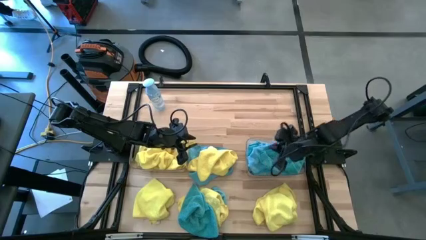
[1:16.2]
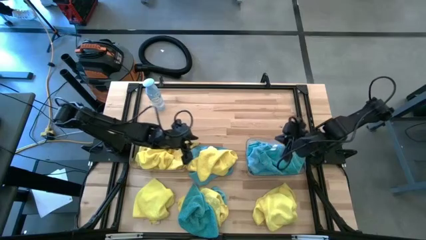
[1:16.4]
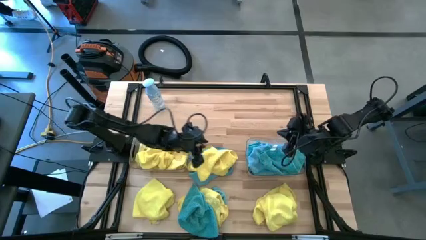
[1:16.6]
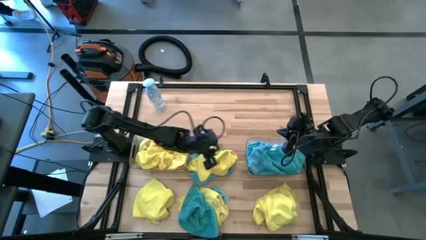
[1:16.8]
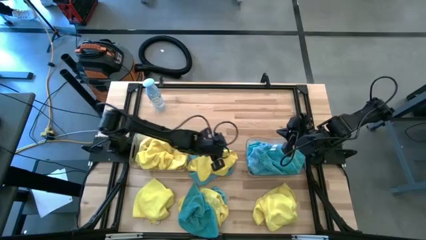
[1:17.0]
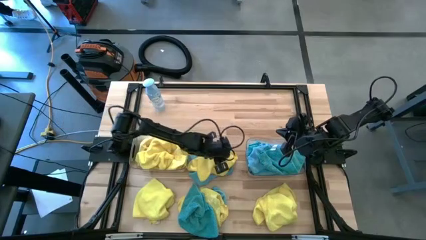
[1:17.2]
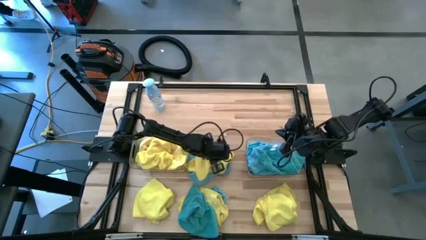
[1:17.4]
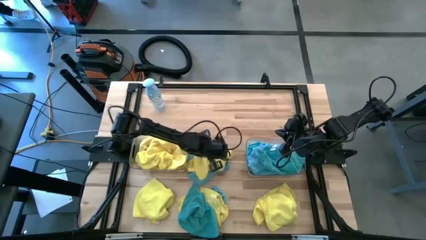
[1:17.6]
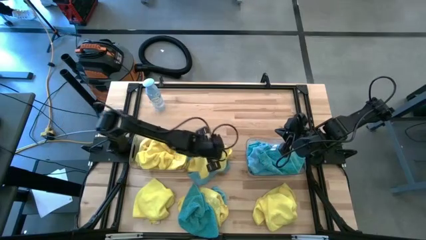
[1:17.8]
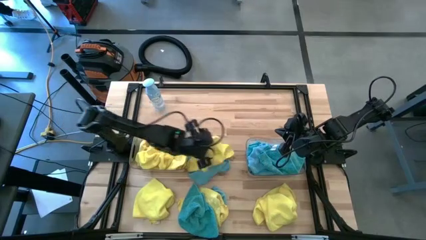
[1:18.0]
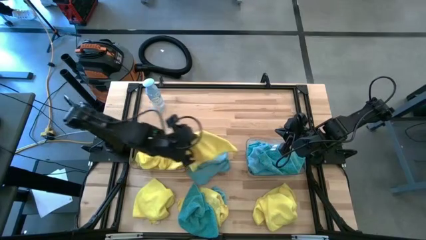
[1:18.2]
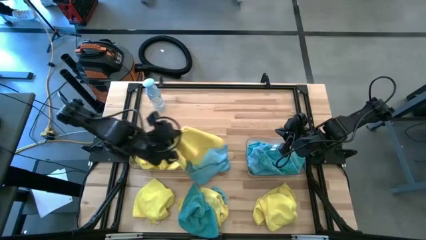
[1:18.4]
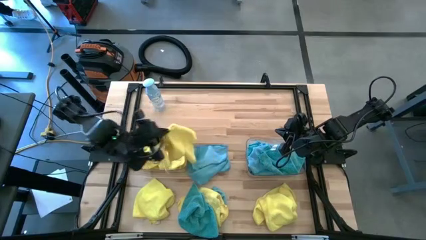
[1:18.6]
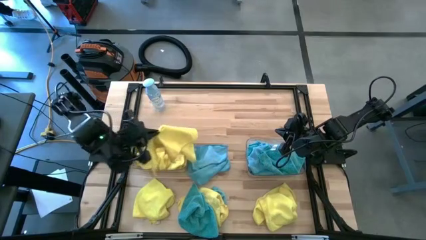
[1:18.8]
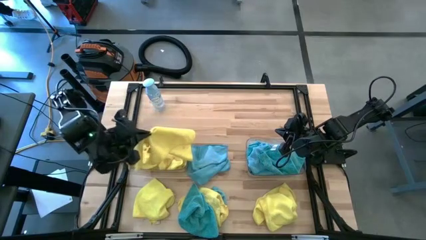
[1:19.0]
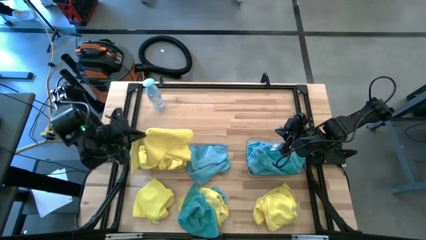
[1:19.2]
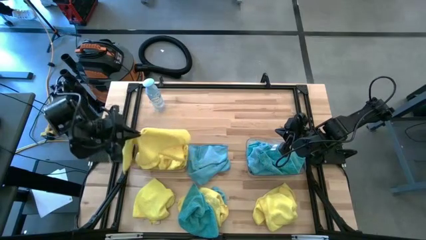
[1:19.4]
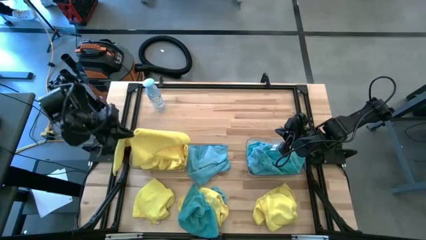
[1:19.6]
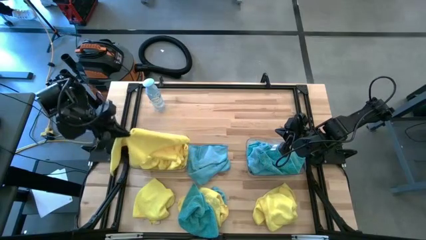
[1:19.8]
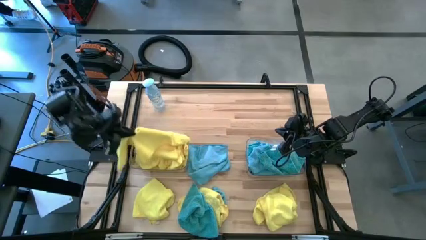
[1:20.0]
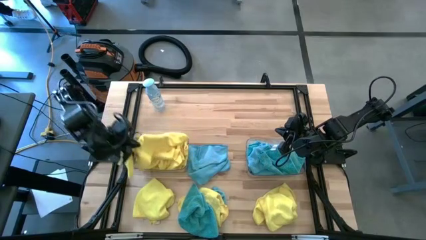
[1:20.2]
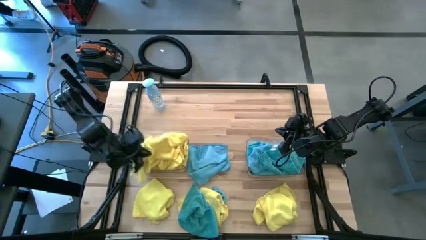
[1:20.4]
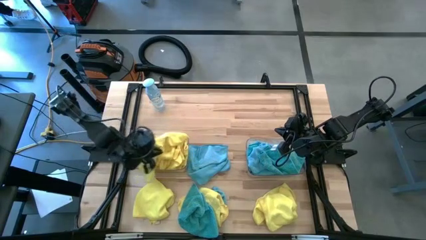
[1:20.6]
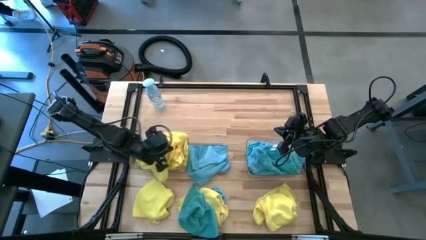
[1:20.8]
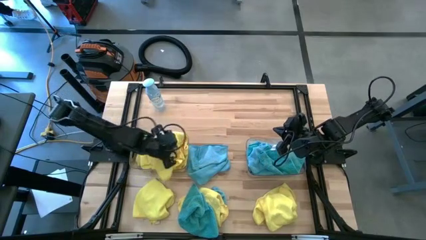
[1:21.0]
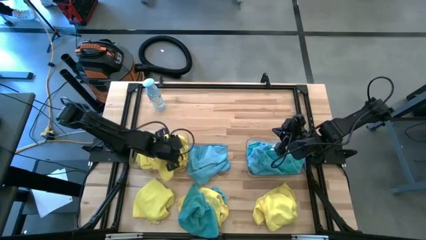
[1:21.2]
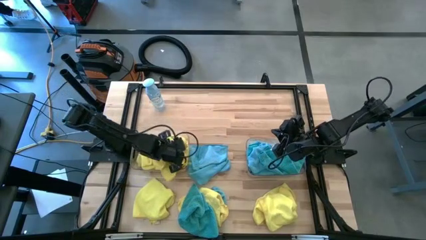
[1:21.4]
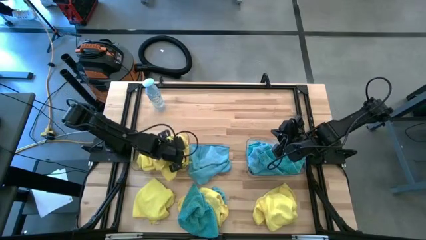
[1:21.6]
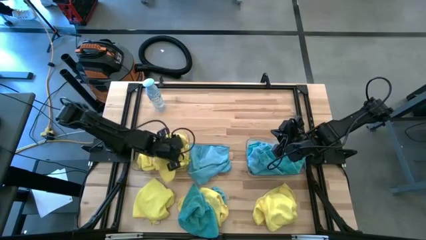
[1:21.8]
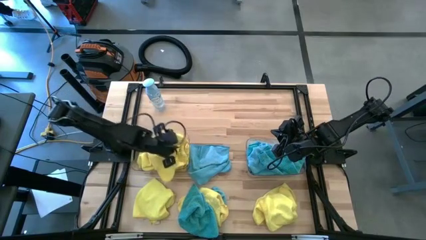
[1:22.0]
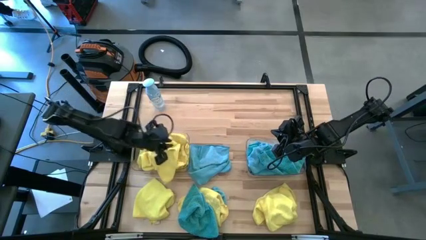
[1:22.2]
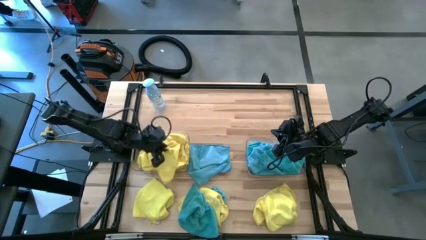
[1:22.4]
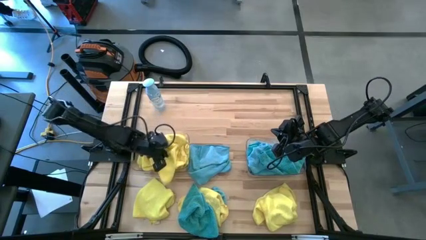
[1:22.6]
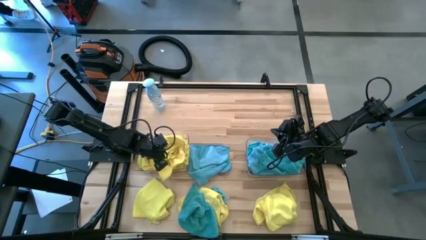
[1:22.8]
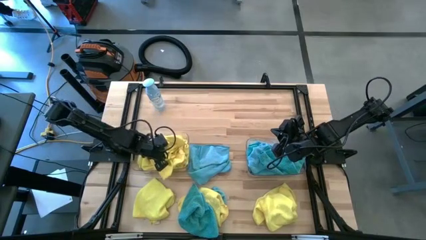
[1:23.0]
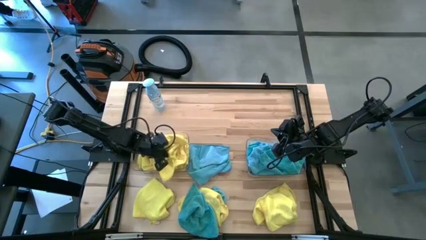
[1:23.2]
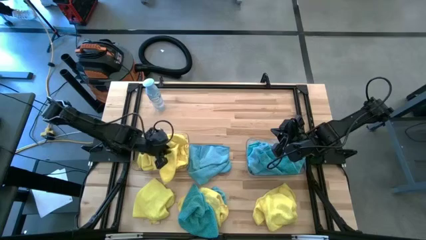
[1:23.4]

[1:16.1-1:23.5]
Task: Sort microfiber towel by color & place in baskets
Put the yellow microfiber cloth into the left transparent bin

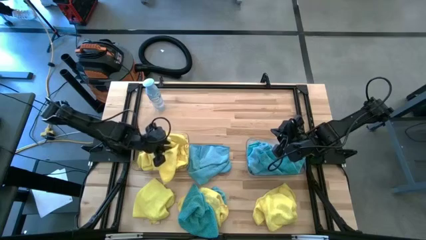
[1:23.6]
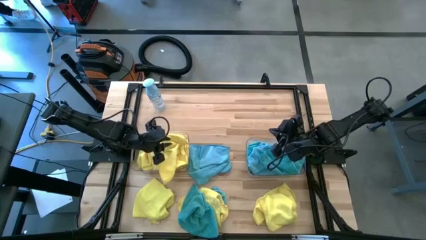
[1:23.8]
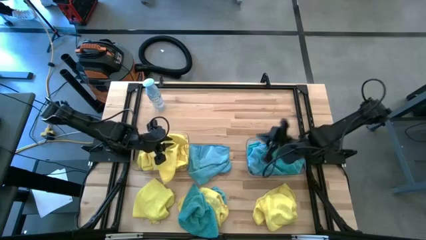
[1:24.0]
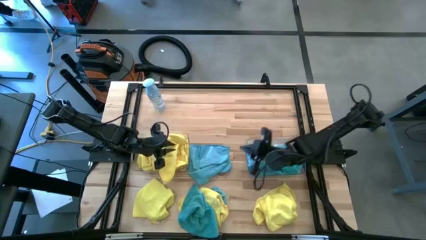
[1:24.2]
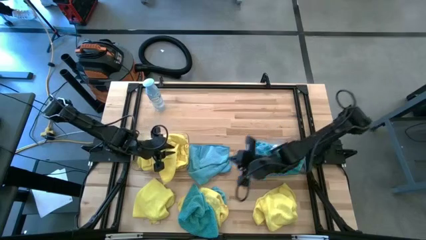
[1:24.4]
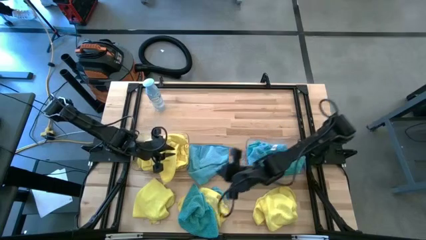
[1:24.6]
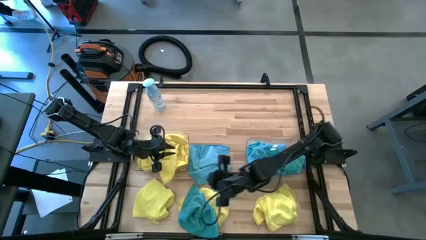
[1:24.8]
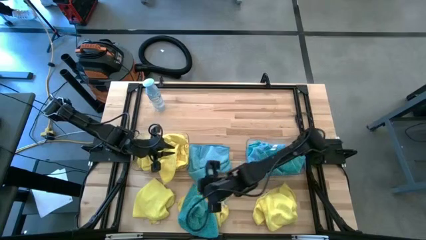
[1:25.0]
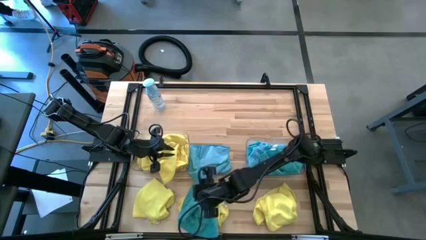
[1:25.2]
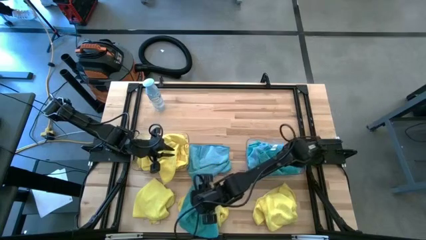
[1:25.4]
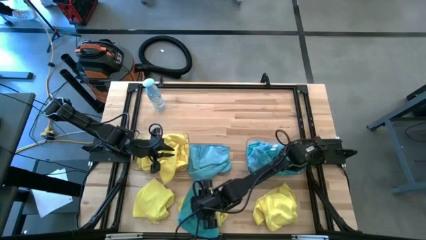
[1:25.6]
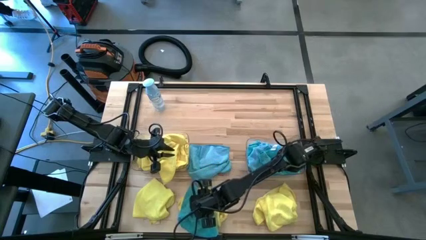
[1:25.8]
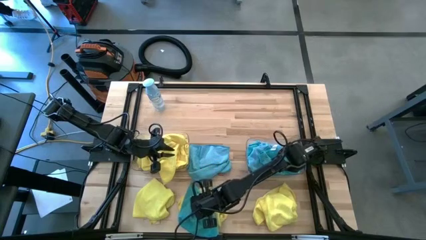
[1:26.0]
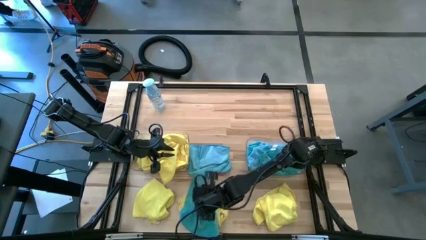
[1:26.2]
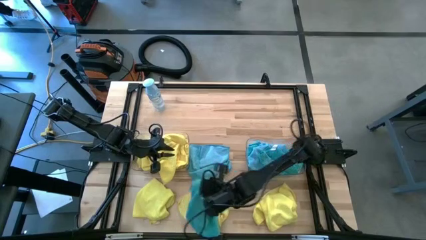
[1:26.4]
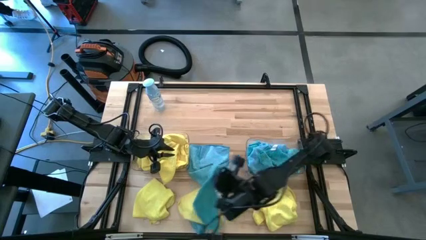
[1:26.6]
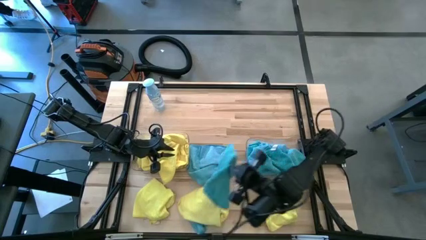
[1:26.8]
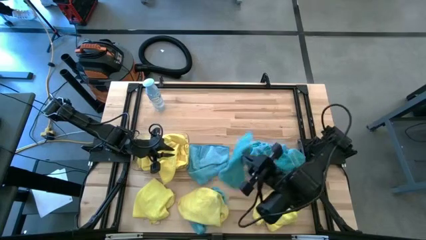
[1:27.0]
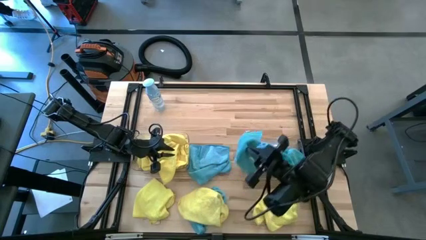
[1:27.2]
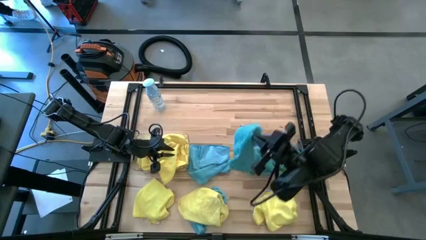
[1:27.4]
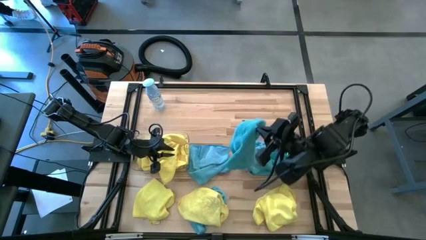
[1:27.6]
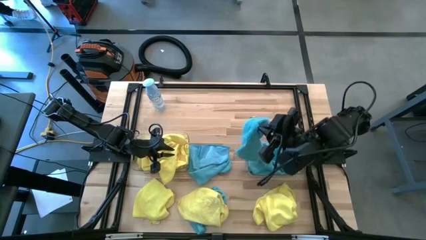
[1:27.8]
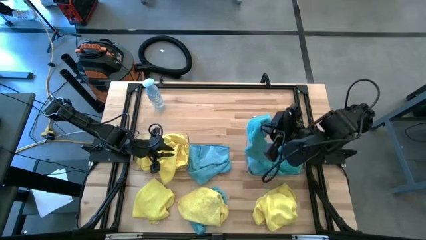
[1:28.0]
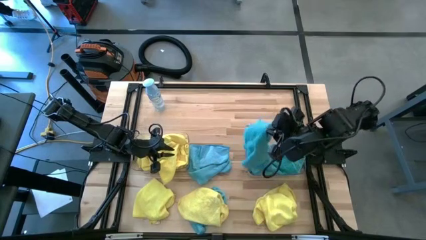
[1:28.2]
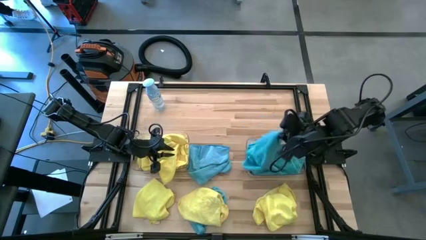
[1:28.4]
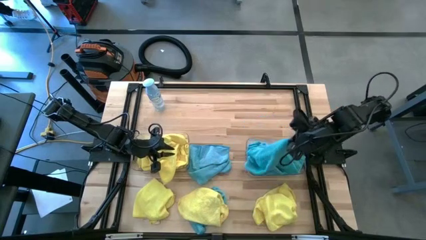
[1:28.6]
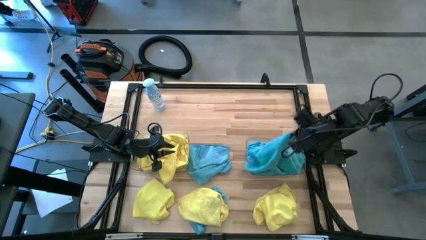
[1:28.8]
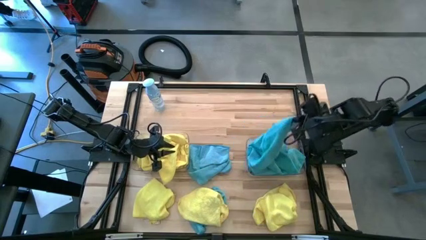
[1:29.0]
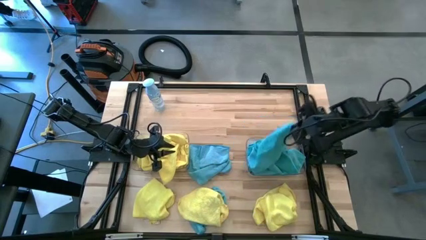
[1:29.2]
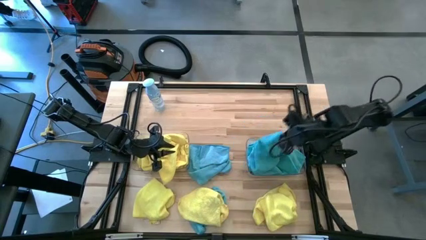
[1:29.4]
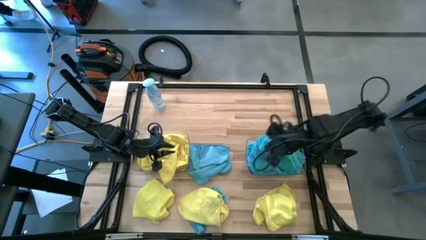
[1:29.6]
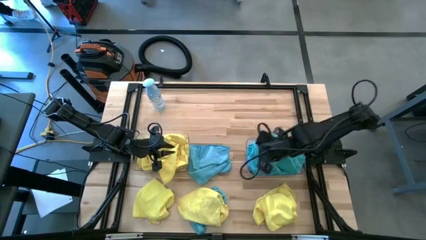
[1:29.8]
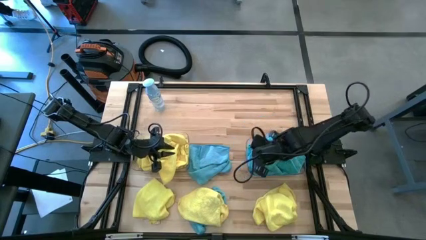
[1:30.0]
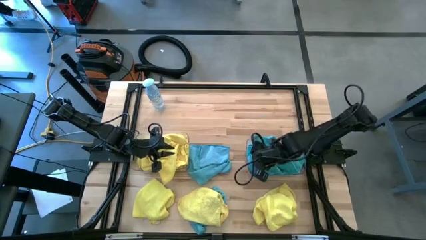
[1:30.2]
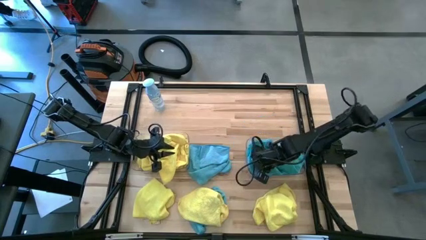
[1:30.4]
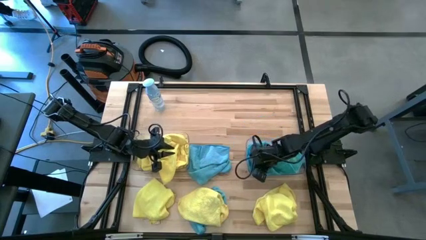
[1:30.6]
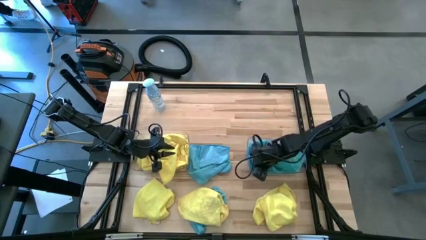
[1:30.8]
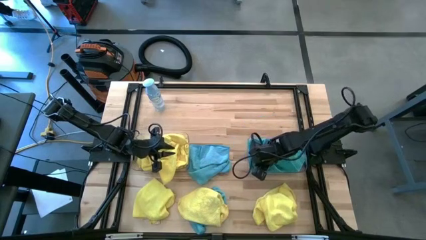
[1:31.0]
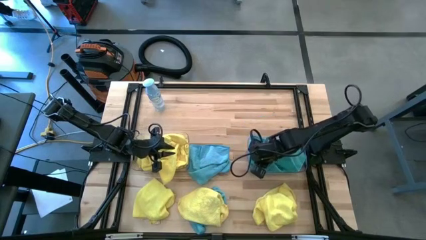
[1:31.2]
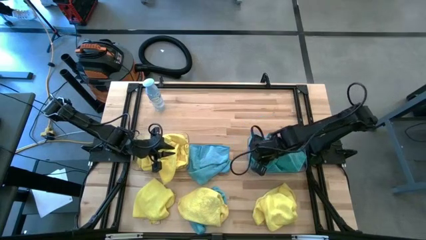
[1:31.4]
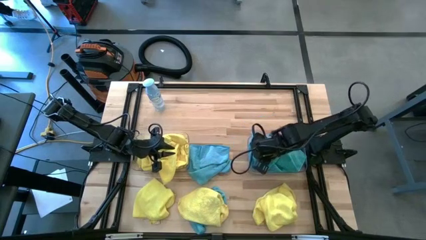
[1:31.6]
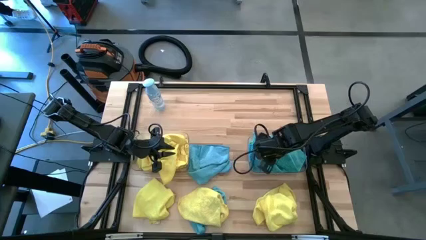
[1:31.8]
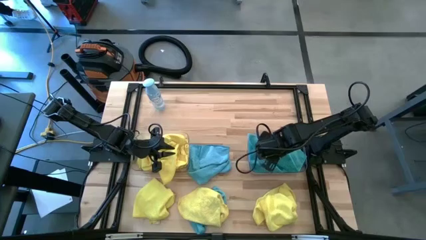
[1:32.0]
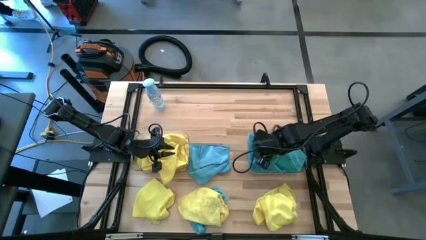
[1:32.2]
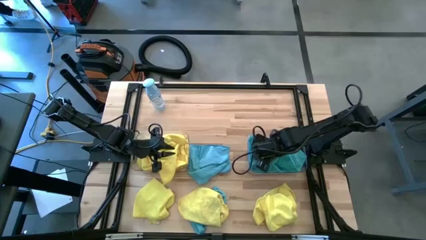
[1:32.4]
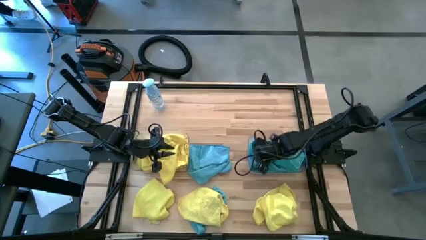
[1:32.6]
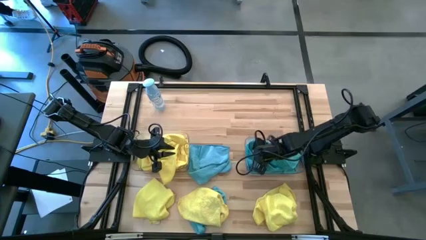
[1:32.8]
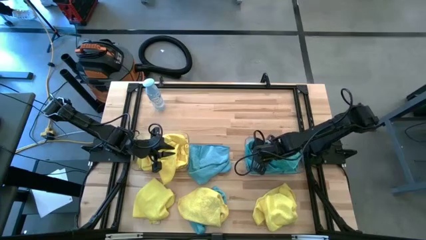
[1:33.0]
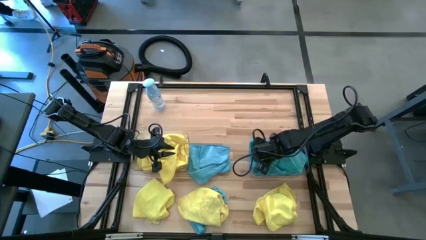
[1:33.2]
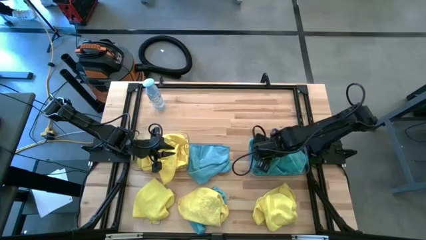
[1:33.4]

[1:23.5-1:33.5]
Put the blue microfiber cloth into right transparent bin
